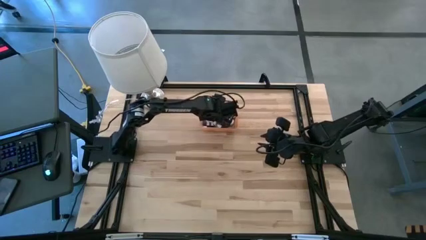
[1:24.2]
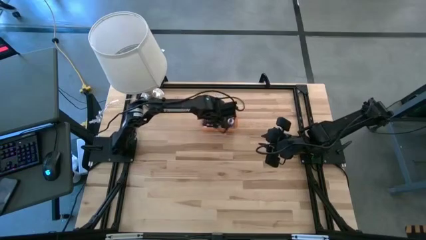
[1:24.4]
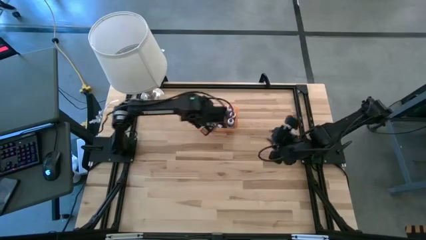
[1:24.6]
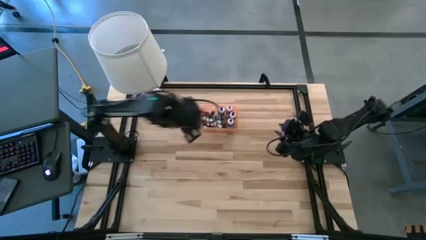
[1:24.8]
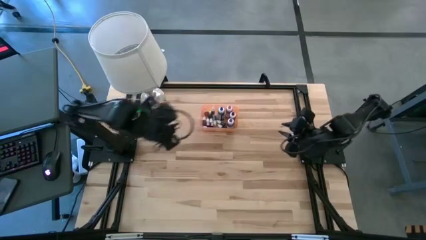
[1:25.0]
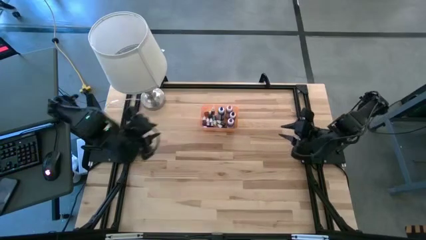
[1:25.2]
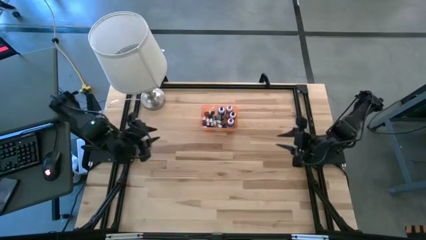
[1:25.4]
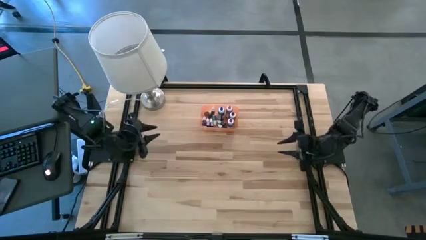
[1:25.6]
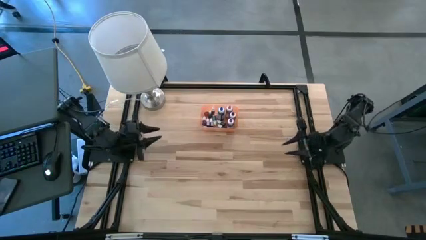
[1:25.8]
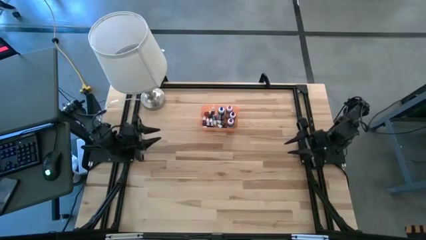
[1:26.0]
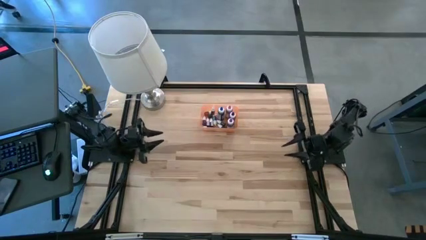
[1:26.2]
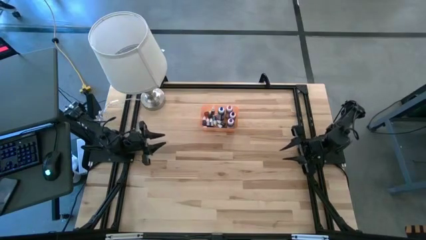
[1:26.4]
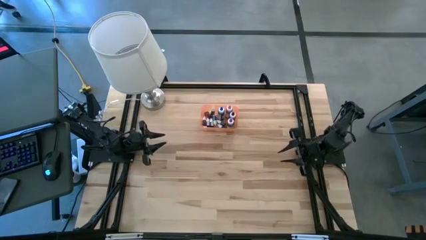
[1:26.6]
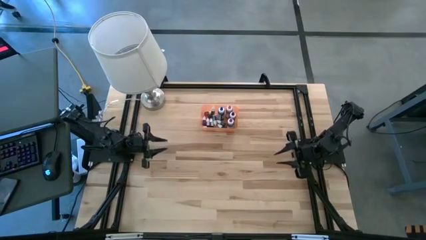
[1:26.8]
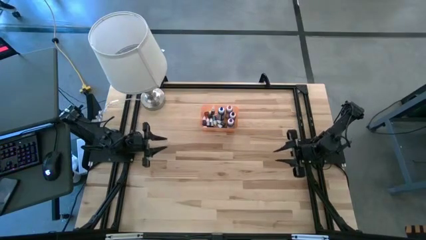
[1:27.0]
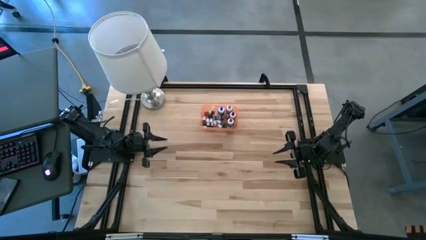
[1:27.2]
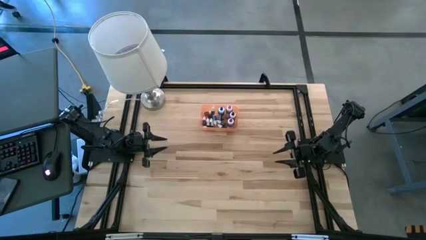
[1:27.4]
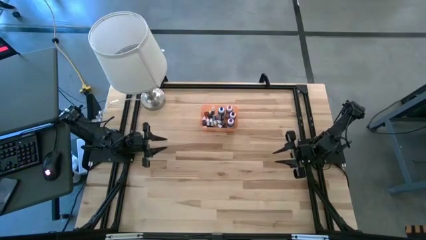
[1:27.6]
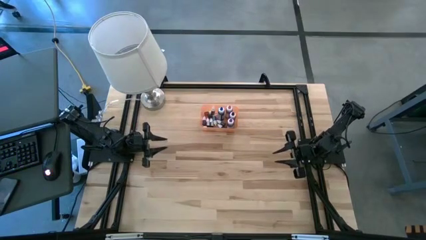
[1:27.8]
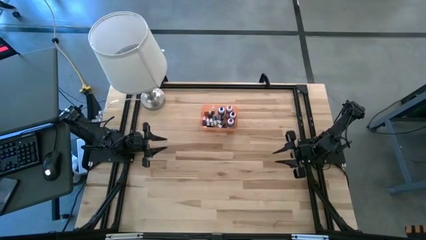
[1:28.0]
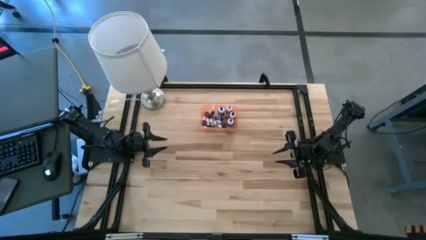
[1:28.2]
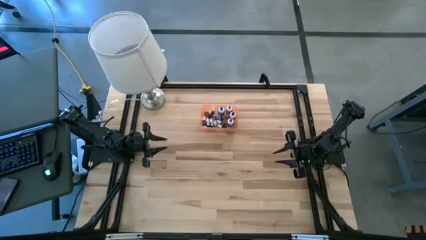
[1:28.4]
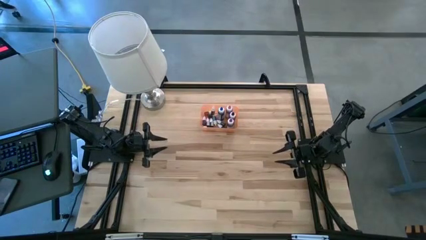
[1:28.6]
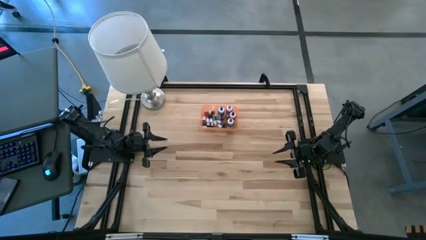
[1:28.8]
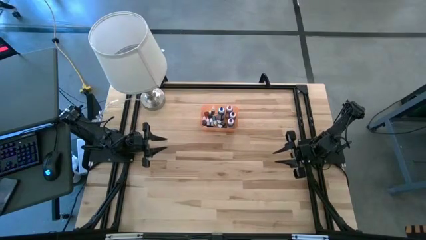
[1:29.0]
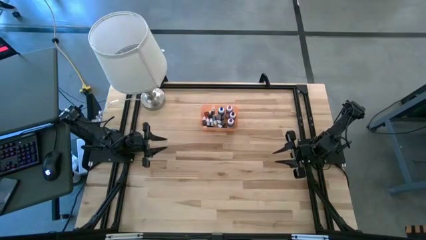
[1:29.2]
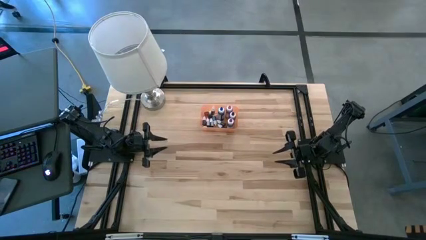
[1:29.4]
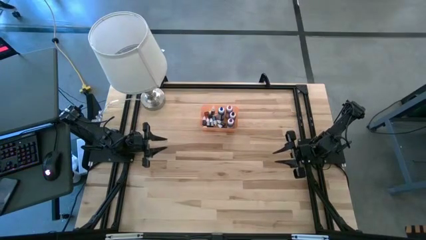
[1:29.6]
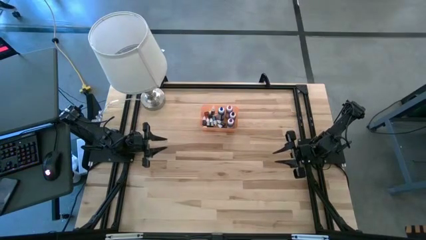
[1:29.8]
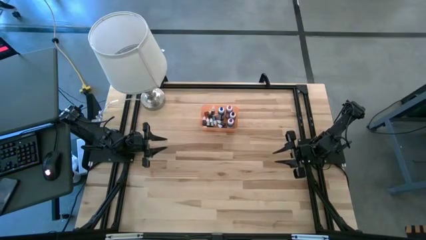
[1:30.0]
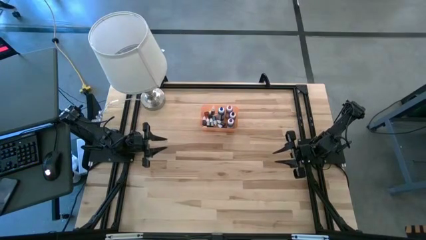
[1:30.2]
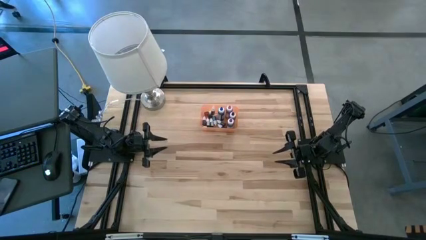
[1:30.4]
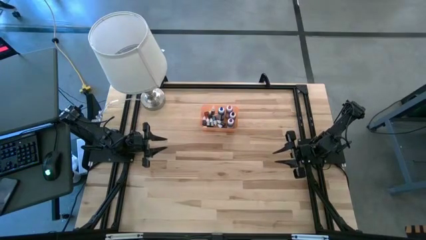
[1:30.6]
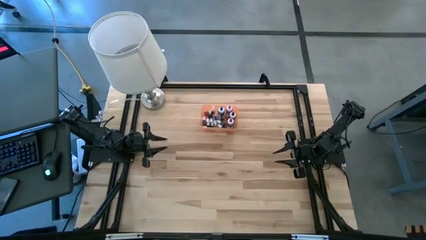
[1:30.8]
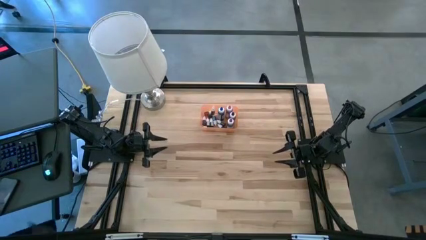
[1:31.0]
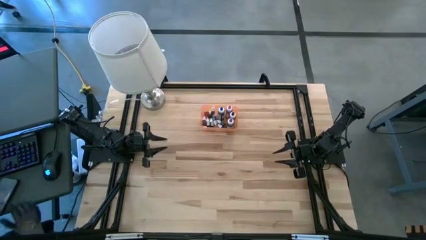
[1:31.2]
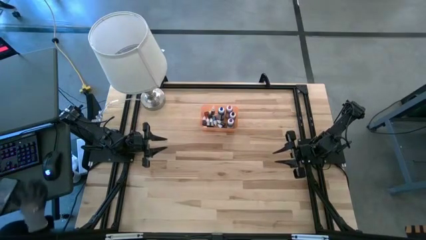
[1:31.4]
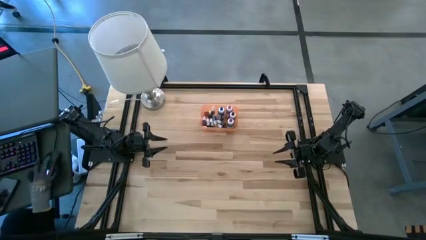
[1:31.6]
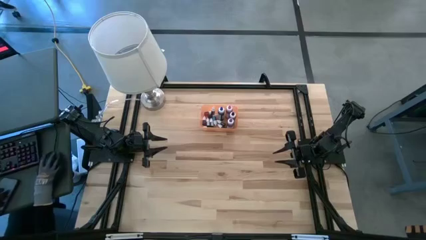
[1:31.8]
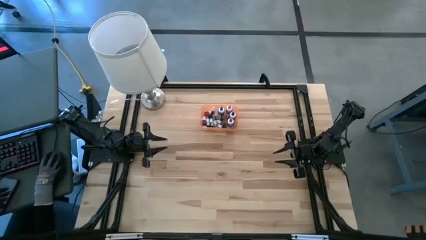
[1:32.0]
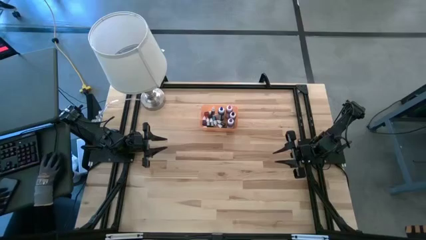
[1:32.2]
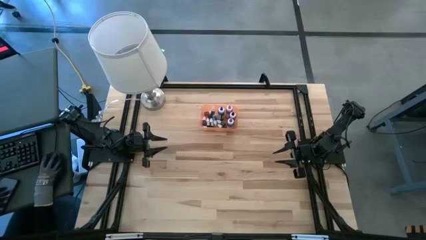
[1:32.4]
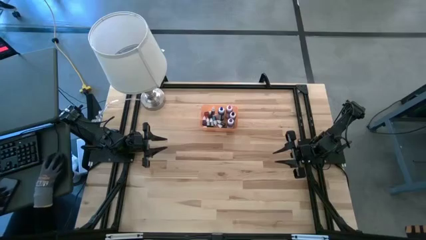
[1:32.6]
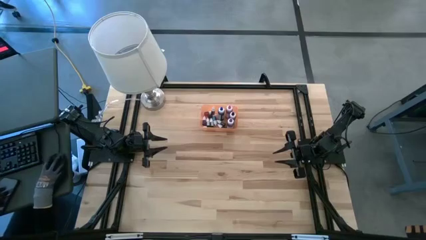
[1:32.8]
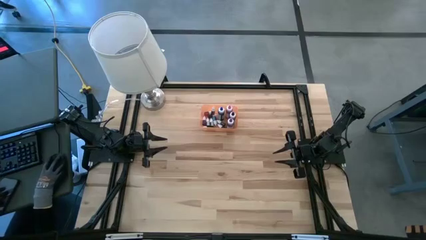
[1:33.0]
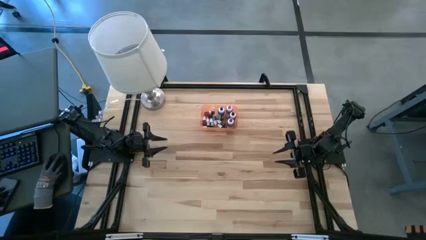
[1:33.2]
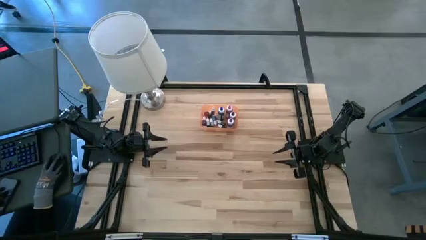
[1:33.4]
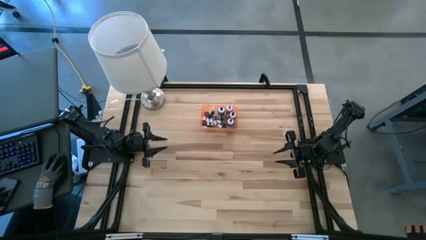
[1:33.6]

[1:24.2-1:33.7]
Task: Pick & Place food coloring
Return To Home Position

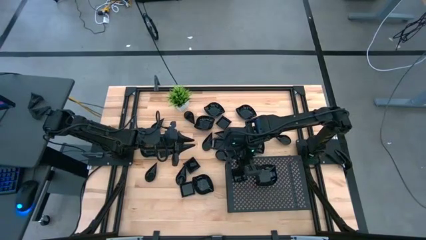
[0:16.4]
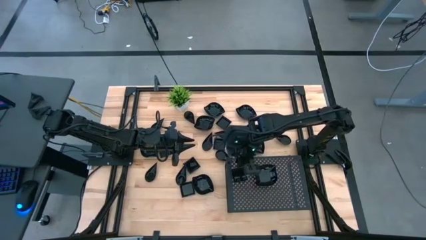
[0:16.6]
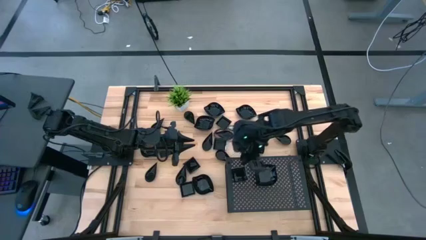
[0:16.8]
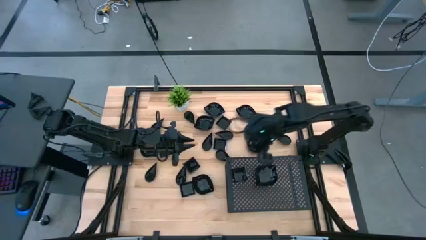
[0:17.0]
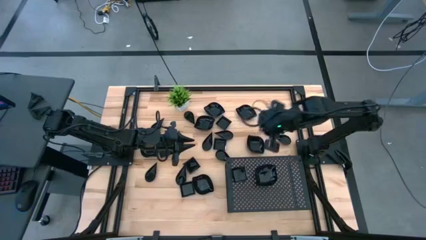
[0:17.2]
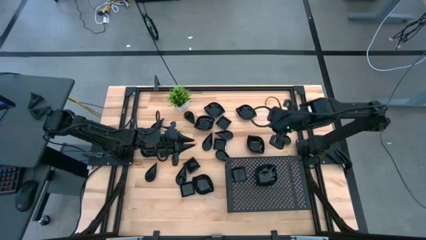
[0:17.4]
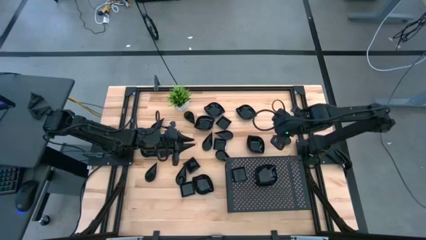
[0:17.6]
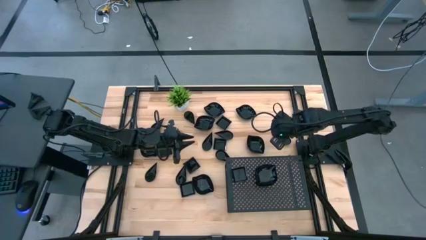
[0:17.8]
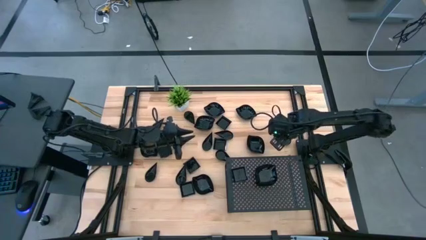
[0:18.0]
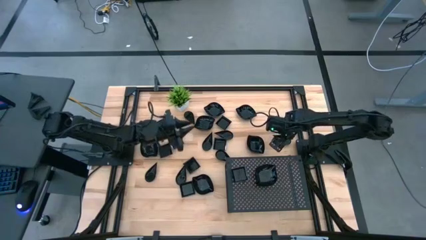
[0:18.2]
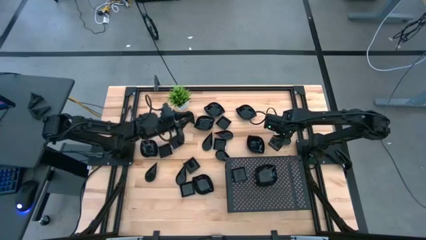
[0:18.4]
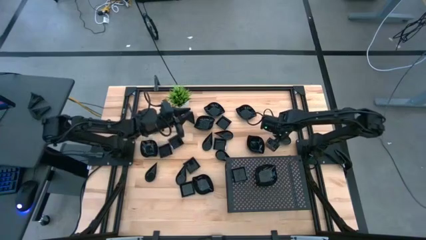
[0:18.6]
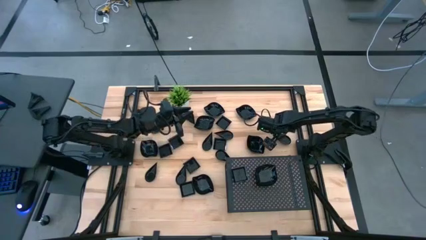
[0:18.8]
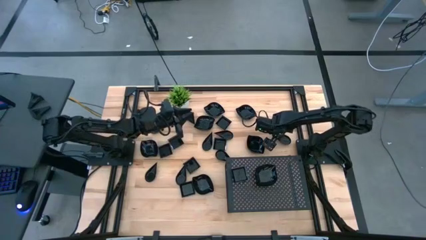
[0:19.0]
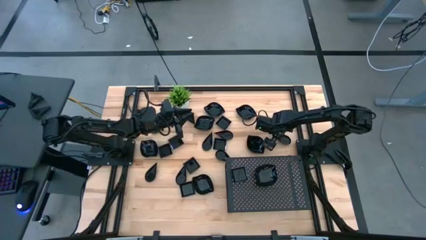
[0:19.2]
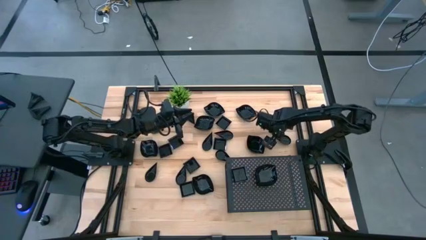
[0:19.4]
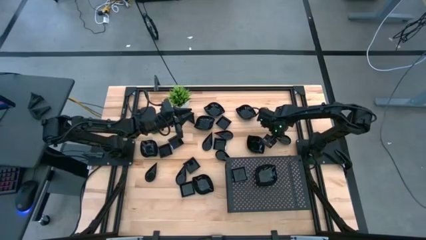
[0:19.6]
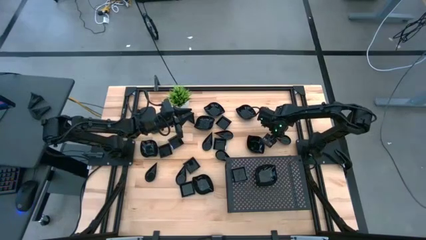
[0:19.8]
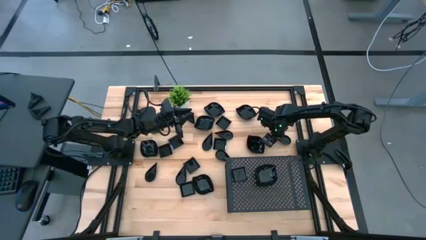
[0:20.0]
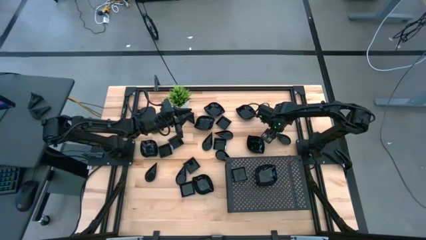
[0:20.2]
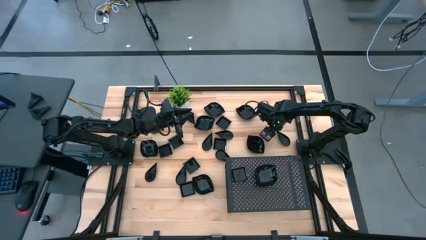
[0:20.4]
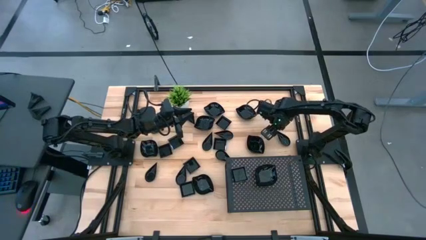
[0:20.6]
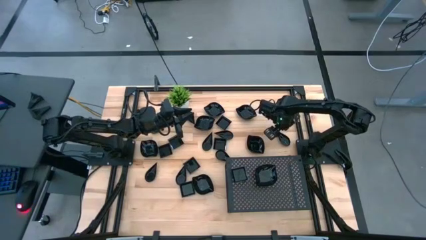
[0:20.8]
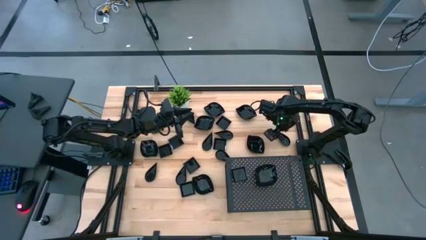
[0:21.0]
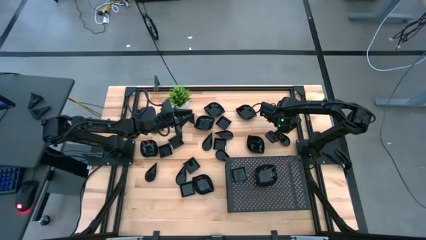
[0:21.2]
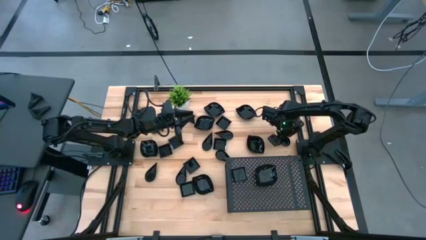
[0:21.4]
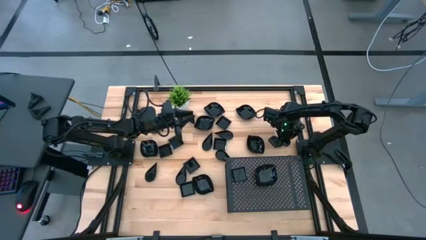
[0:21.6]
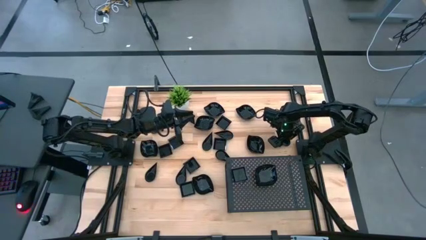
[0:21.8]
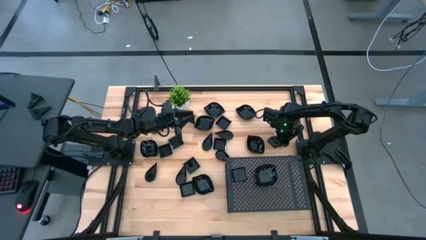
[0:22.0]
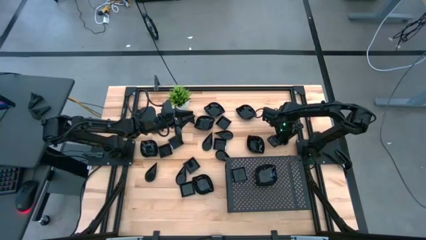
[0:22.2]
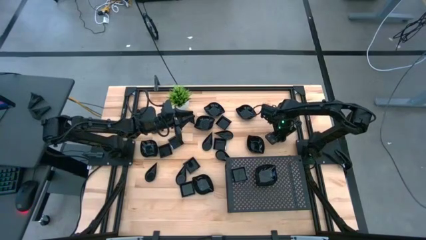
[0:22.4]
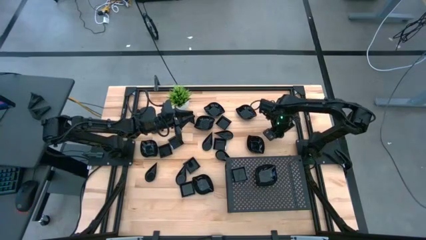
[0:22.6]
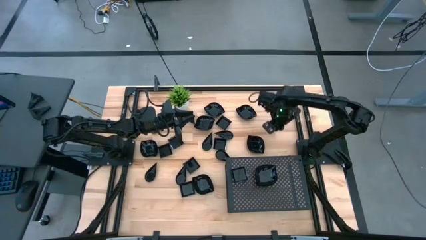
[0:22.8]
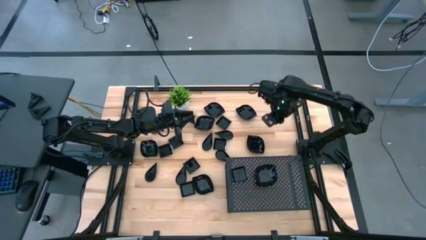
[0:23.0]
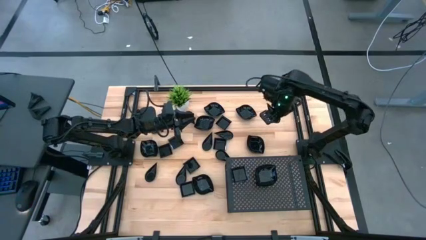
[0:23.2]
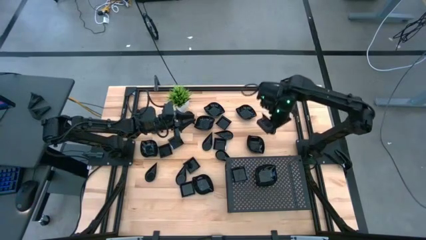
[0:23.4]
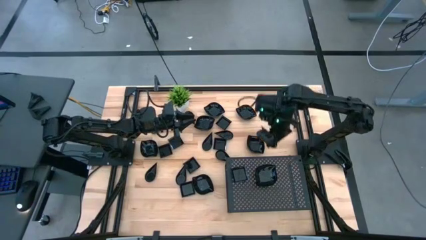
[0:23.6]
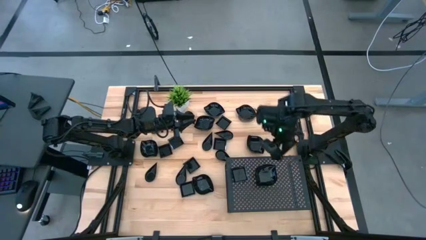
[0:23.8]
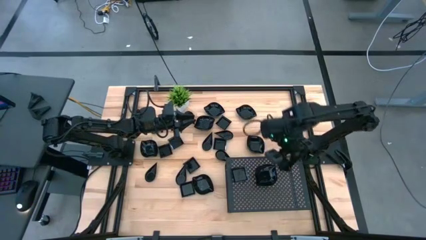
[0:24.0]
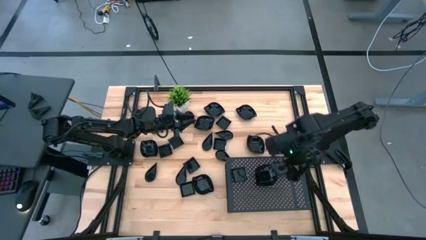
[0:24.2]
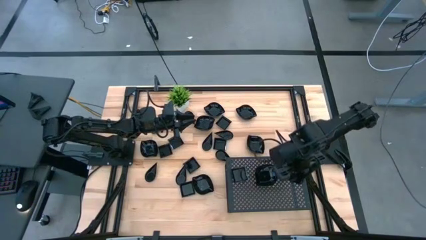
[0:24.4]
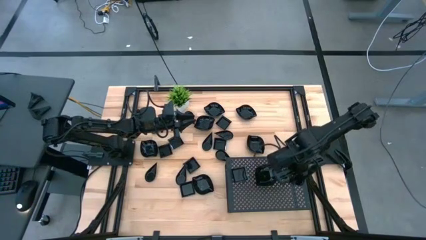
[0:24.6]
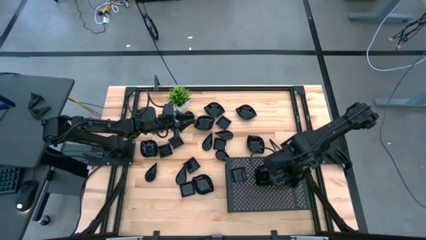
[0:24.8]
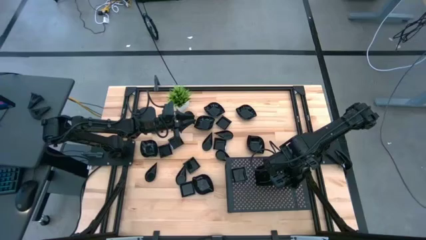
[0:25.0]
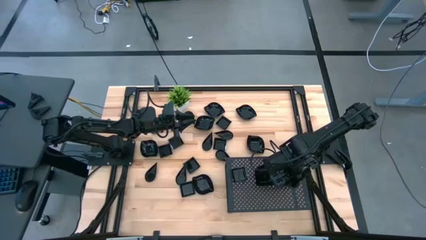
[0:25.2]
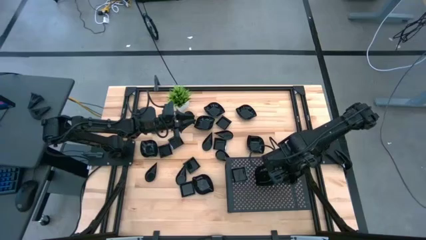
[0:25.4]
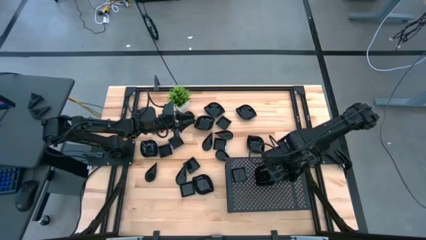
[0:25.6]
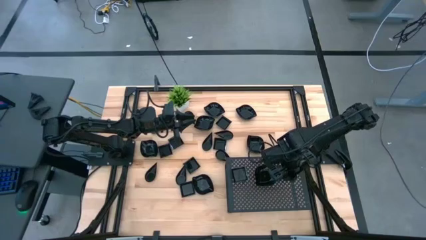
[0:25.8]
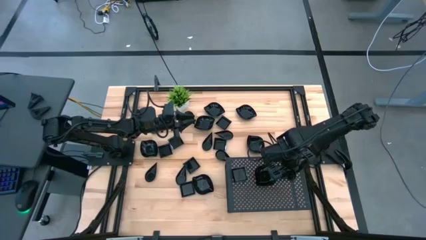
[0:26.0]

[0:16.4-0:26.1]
Task: Pick & Place Mini shaped plates
Put the drop shaped plate on the shelf
